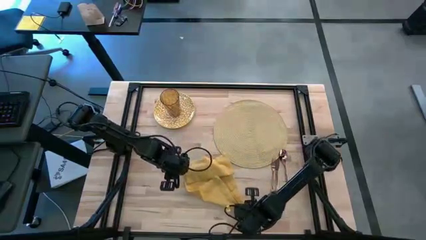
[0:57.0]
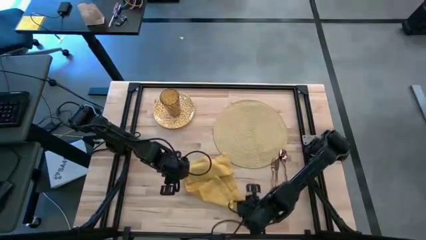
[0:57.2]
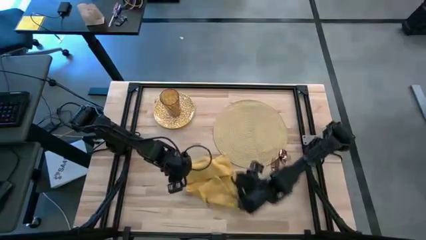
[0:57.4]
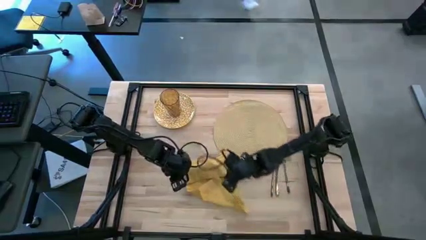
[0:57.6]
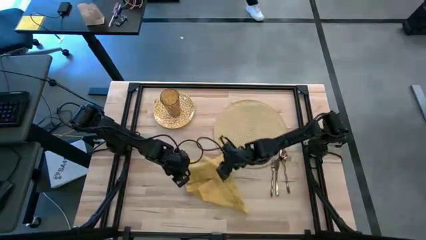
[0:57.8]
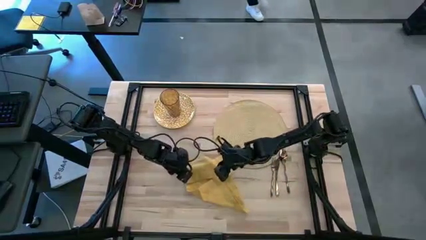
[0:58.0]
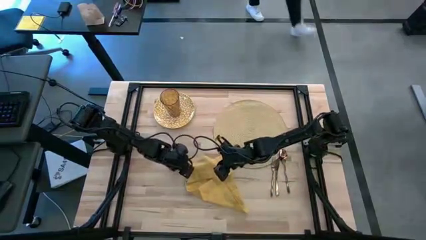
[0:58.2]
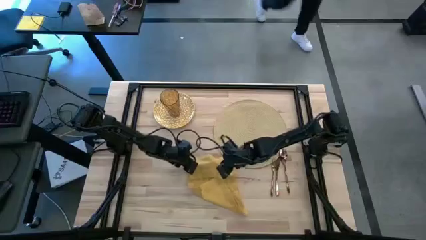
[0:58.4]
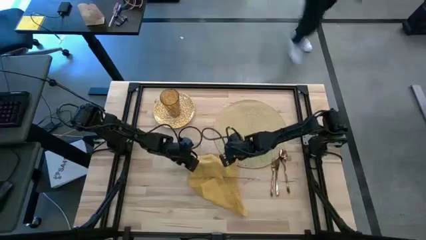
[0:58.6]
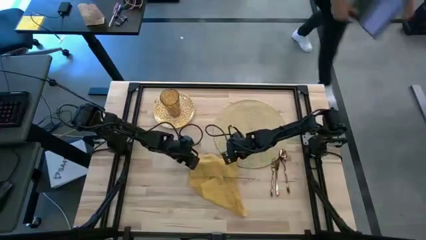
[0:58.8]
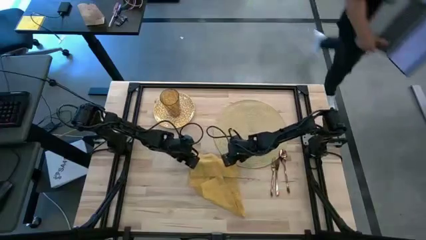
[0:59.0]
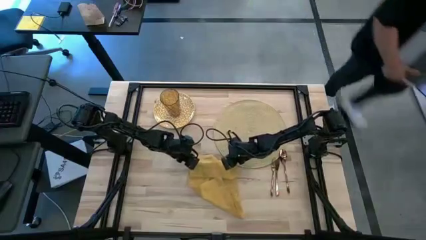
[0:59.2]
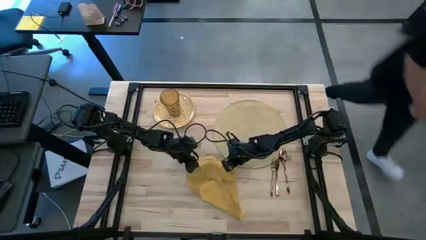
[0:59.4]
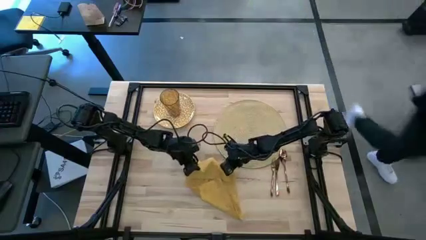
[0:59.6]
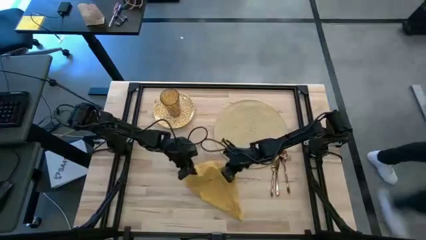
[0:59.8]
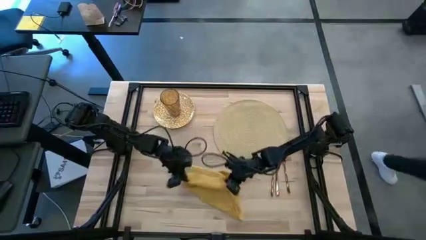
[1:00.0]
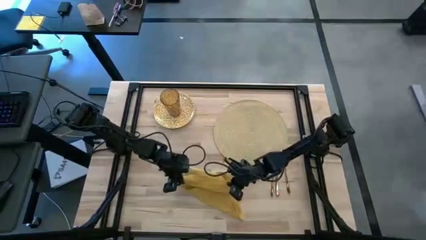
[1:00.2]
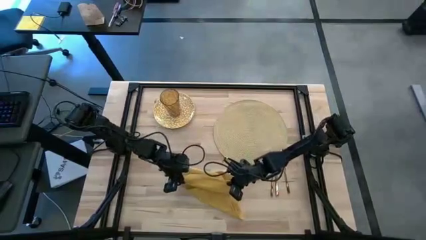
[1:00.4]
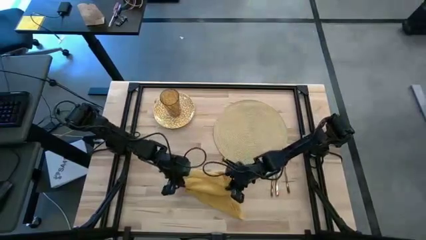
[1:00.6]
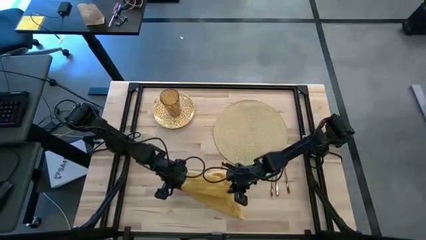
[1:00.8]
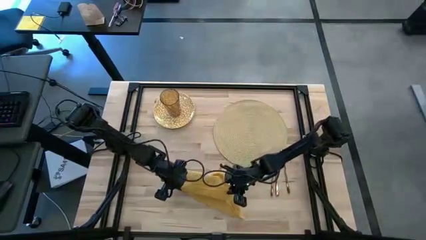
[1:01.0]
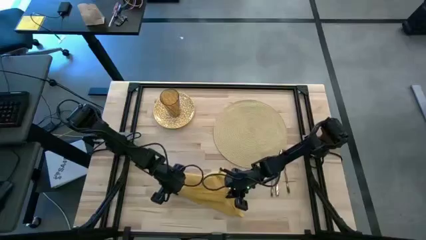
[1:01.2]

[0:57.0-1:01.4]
Task: Set table place
Fold the yellow table napkin

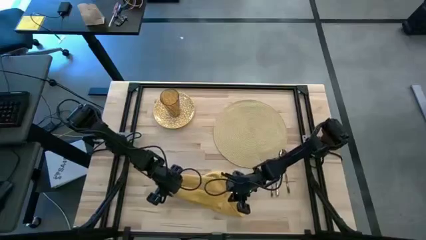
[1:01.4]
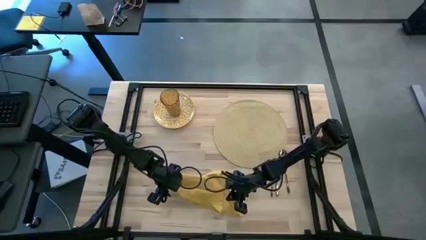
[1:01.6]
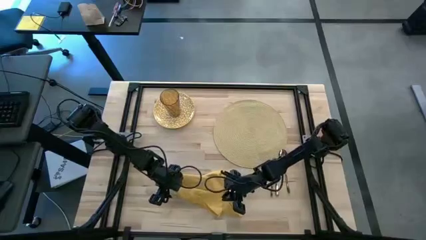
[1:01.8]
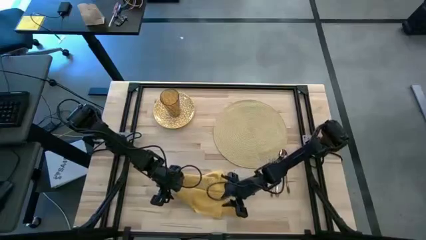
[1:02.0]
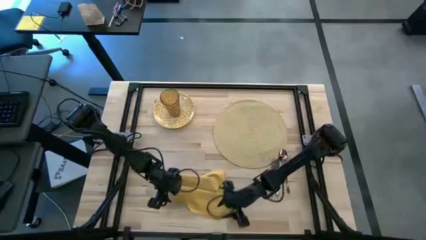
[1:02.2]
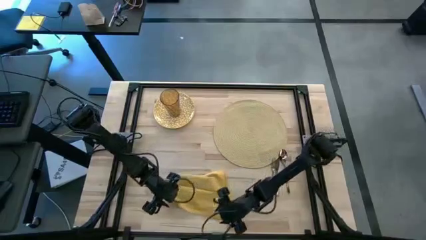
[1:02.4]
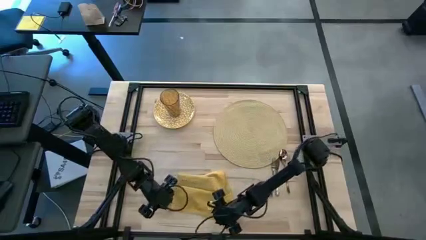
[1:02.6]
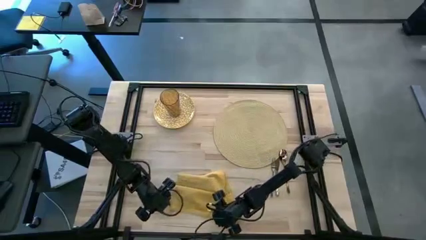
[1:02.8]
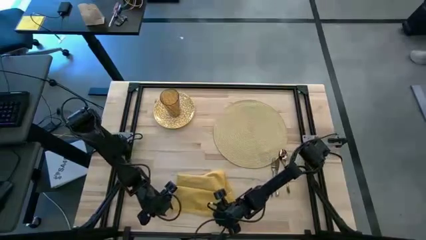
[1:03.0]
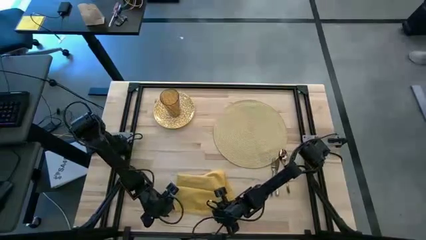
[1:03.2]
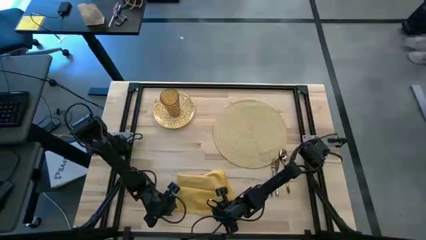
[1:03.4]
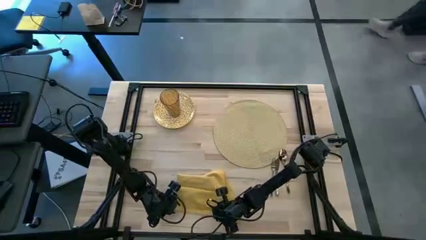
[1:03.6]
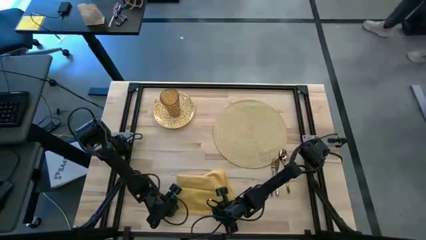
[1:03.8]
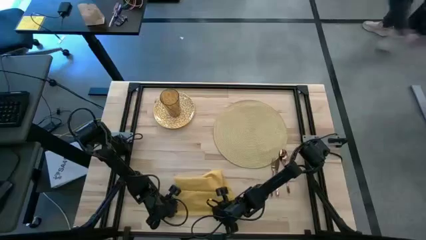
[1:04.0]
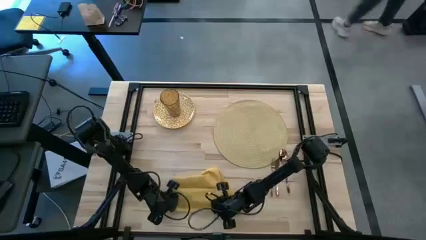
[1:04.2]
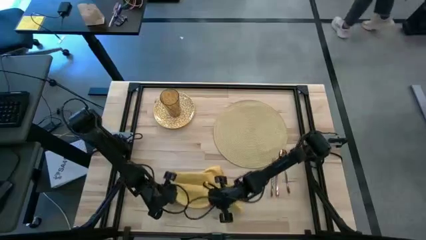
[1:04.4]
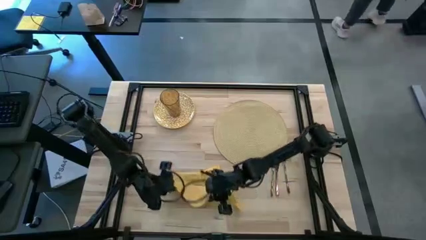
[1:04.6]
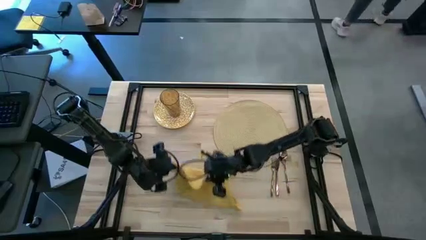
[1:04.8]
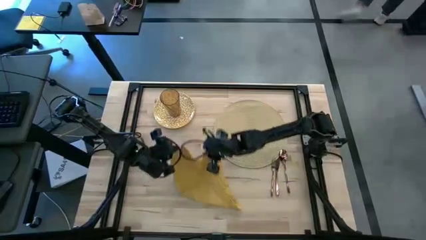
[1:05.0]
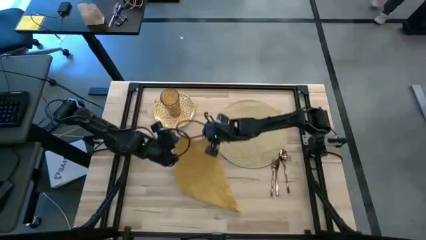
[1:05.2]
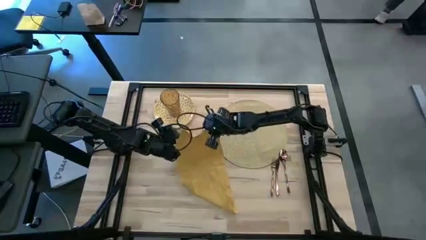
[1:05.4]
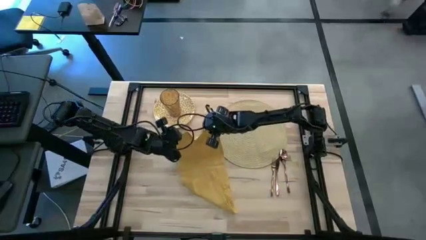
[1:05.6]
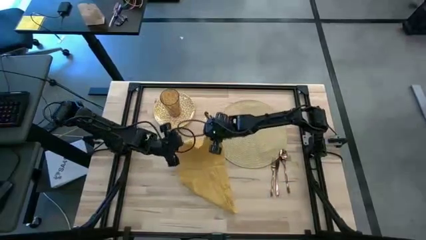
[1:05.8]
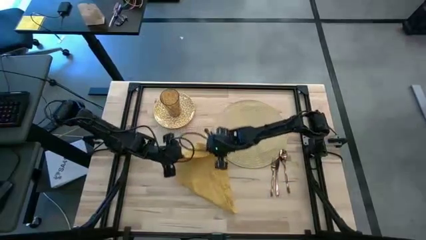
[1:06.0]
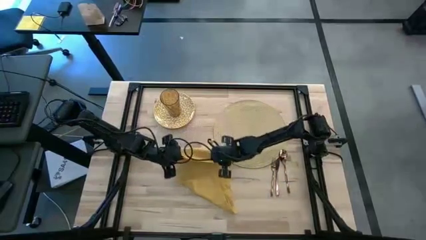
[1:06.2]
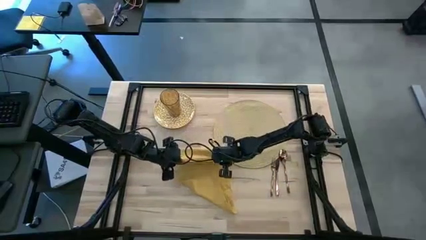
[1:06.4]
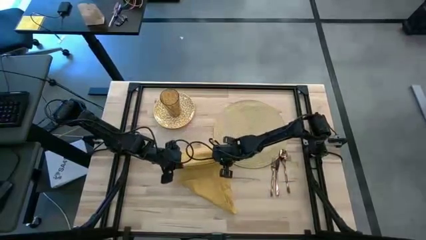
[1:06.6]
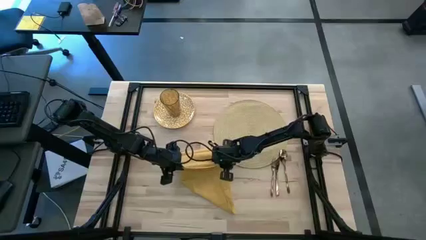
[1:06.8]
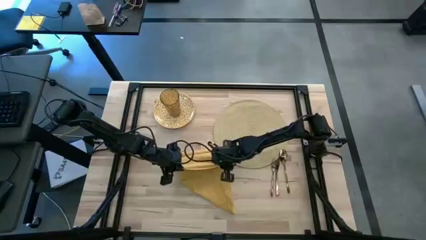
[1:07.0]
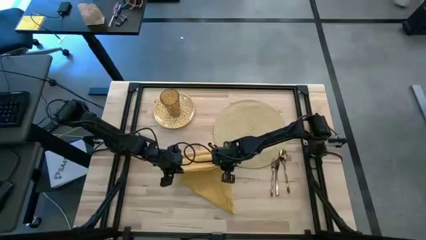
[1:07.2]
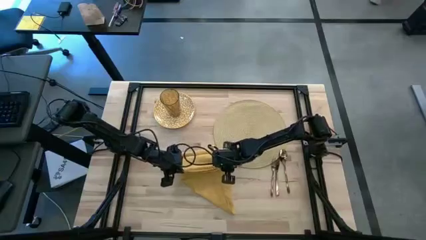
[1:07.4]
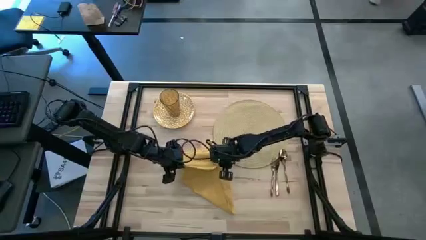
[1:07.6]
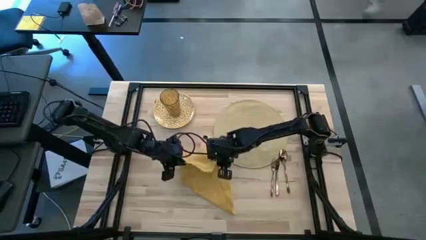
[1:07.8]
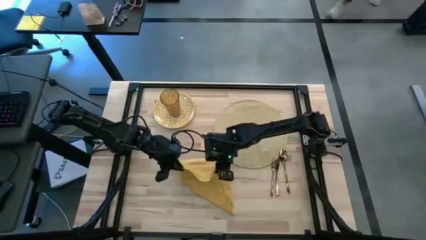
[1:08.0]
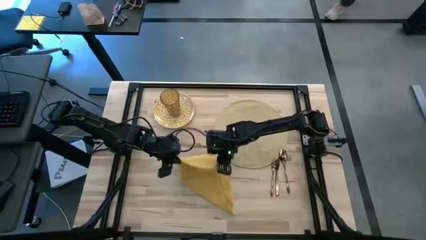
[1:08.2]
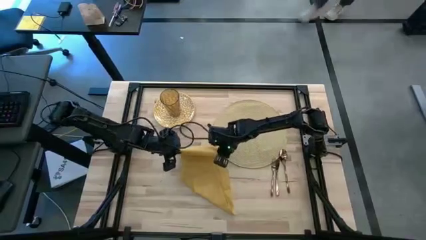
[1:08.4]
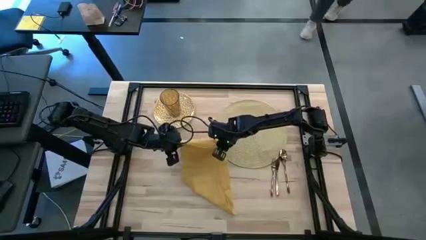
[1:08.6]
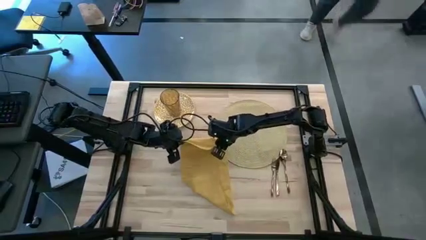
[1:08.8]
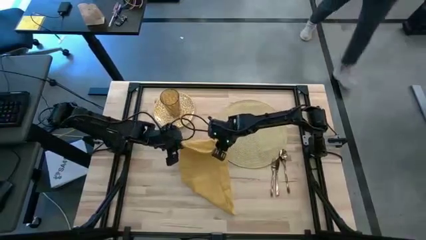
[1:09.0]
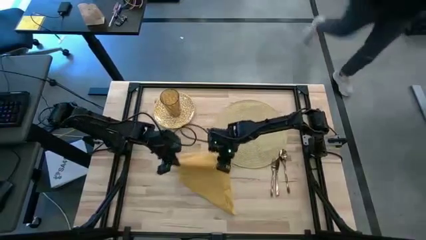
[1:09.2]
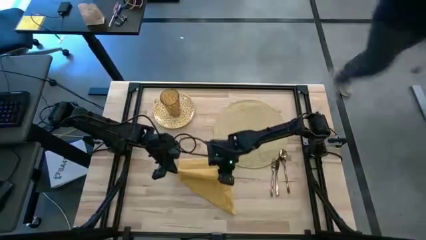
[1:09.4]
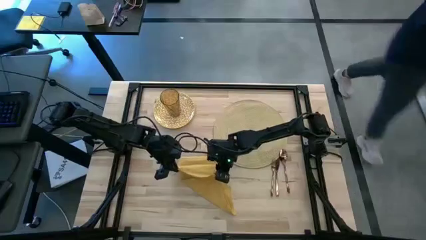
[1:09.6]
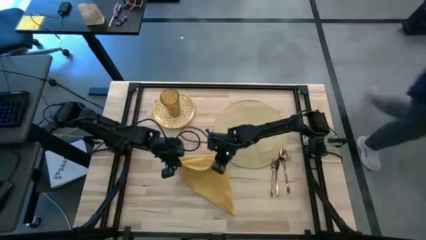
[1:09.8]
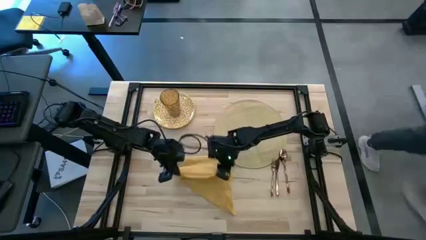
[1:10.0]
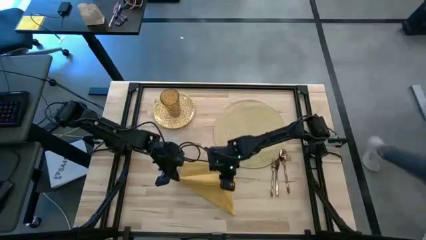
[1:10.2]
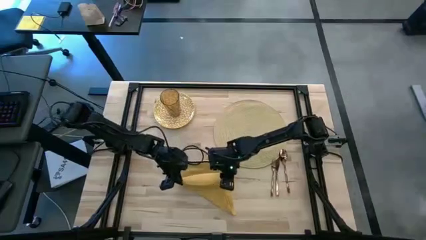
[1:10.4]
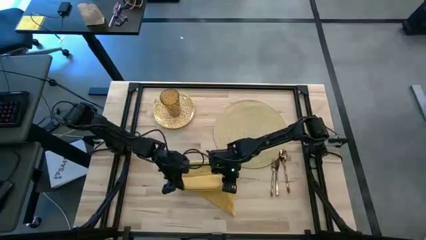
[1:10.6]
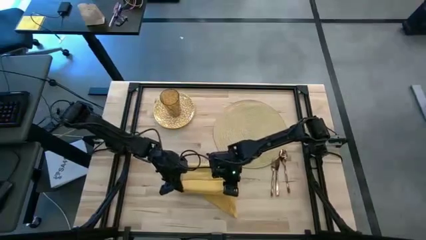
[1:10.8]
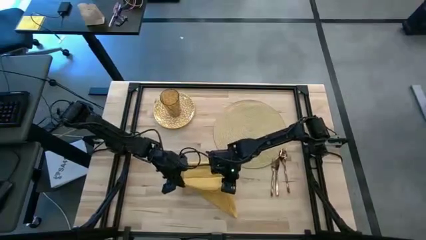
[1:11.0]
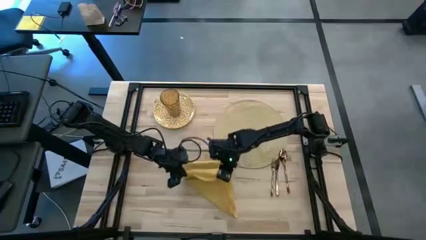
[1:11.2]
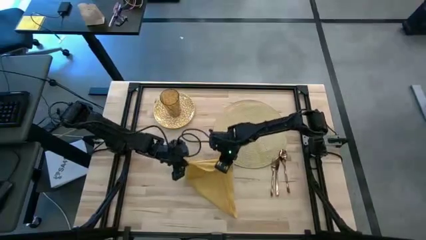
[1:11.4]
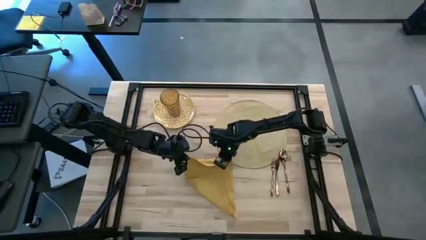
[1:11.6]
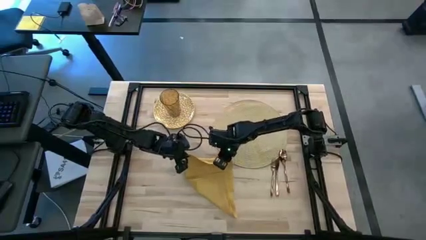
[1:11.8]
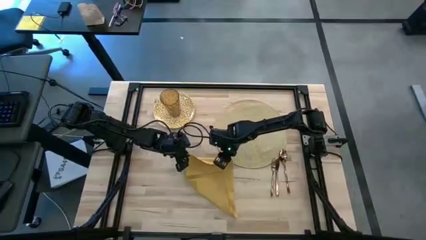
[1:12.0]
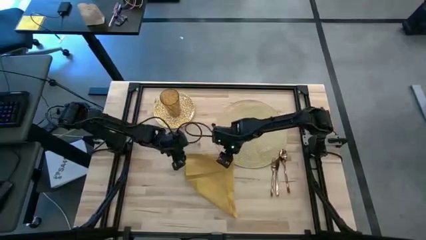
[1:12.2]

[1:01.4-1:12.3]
Fold the yellow table napkin

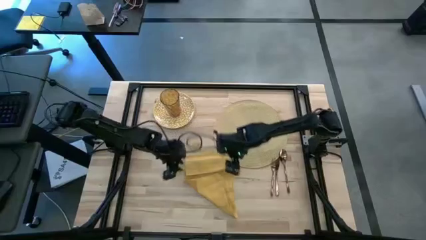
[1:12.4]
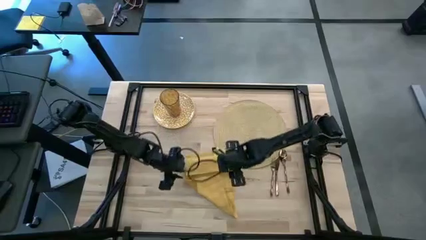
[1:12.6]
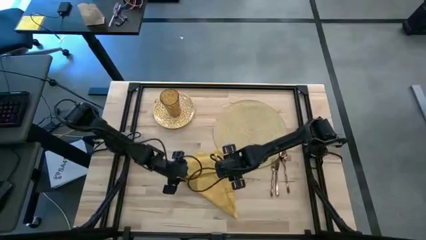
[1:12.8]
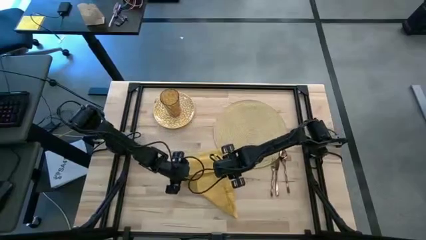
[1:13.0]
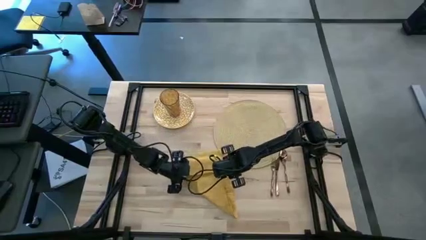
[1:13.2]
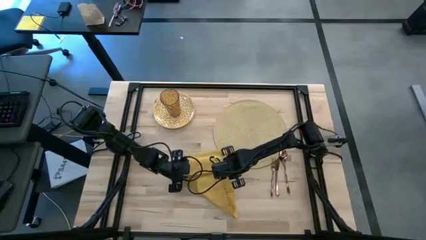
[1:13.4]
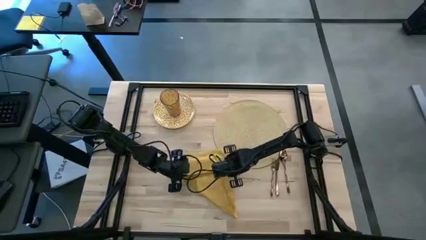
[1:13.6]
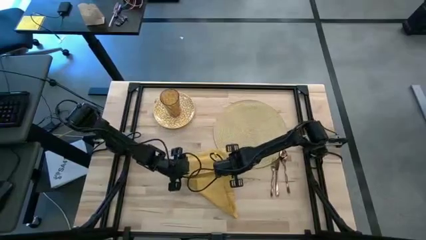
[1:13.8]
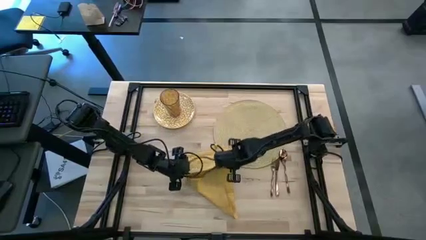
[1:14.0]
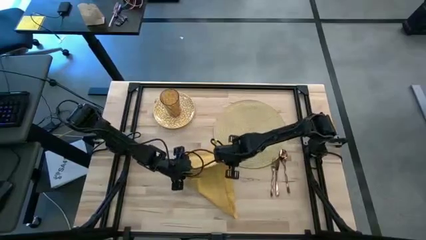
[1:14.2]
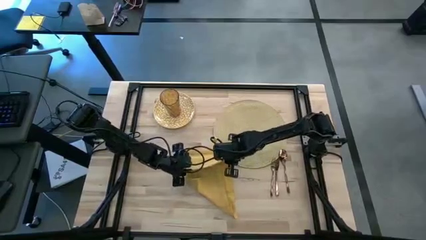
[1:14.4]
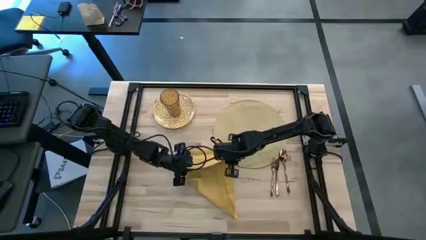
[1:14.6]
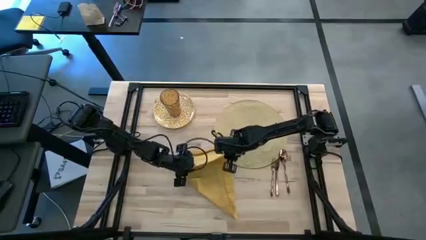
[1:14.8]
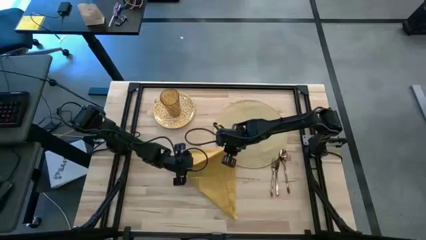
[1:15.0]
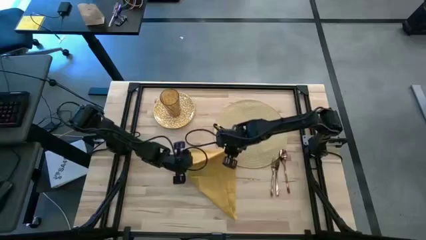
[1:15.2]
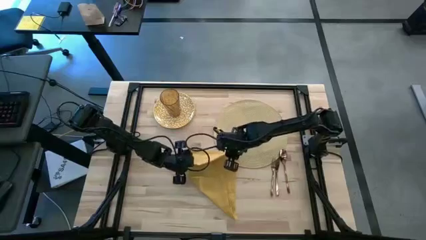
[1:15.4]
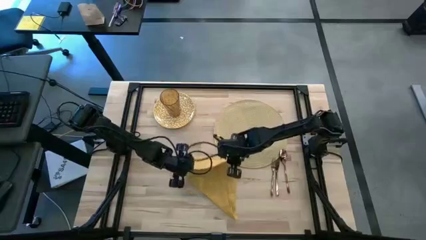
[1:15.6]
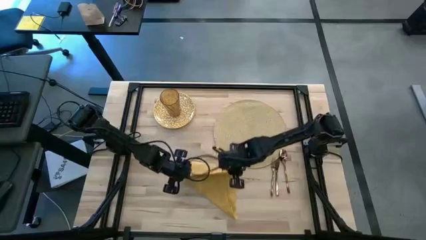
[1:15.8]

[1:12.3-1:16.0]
Fold the yellow table napkin
